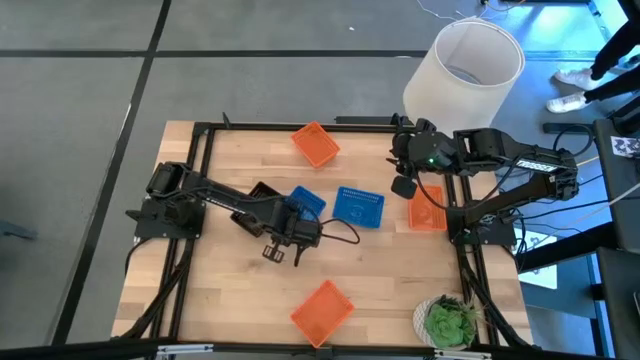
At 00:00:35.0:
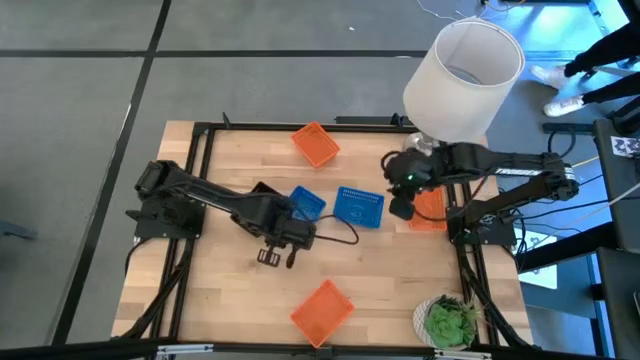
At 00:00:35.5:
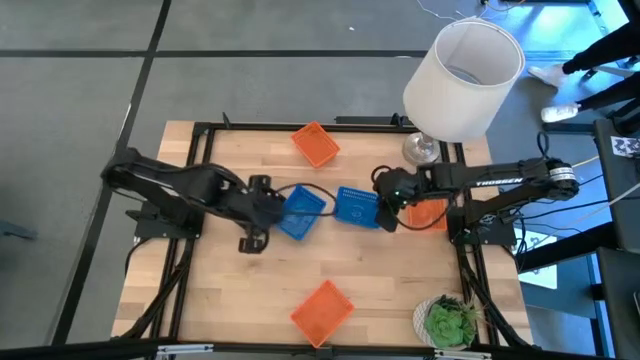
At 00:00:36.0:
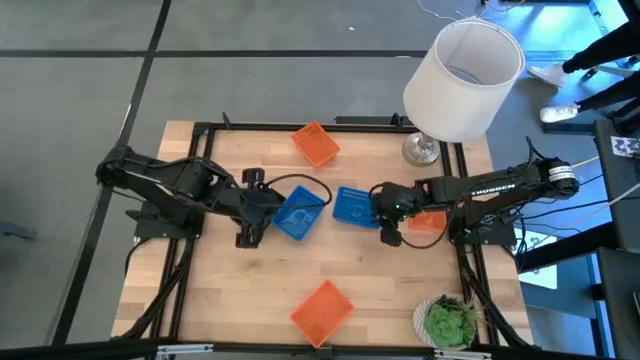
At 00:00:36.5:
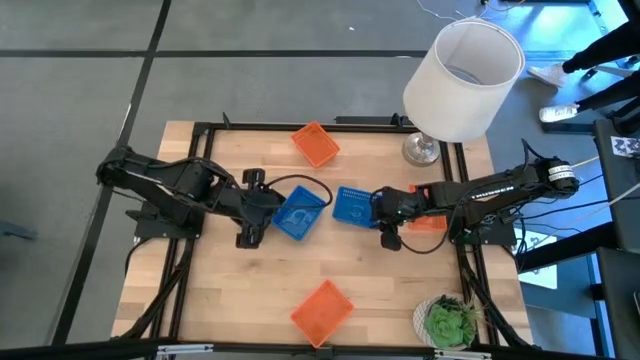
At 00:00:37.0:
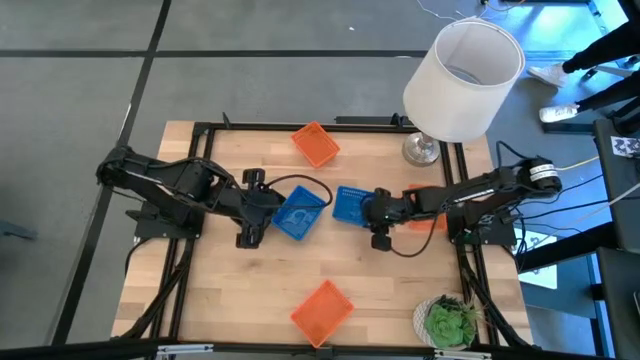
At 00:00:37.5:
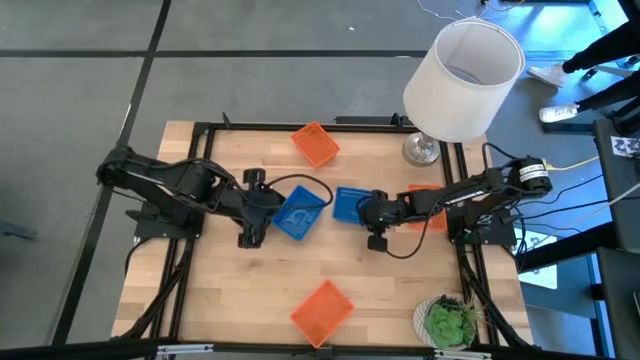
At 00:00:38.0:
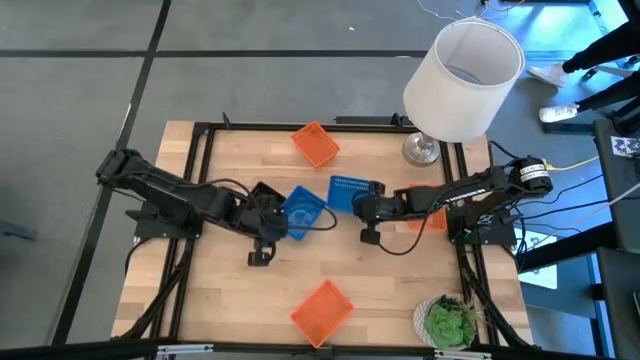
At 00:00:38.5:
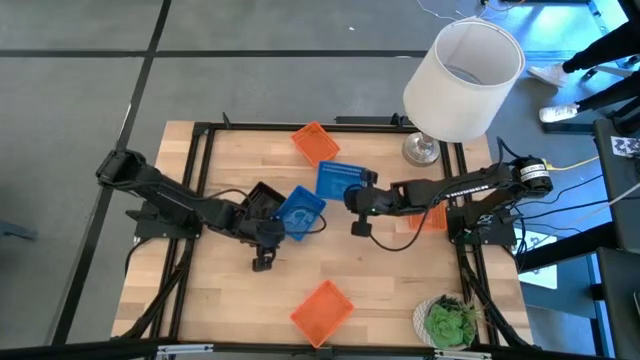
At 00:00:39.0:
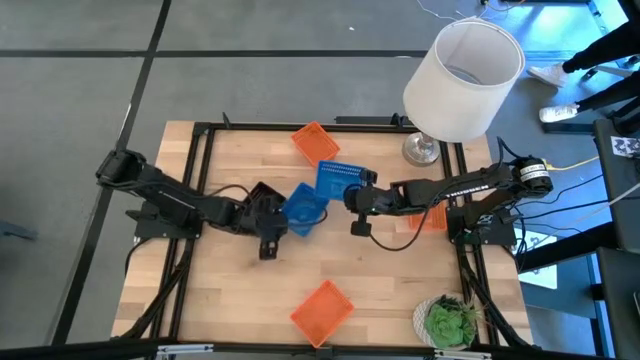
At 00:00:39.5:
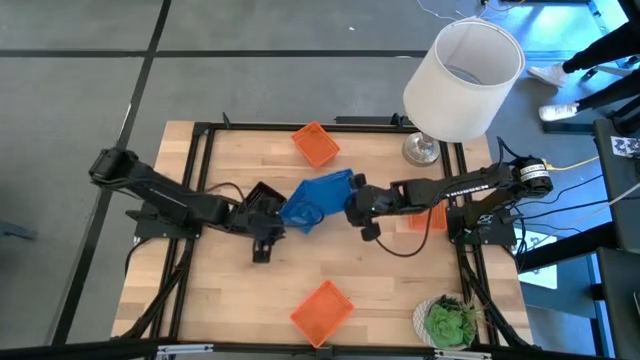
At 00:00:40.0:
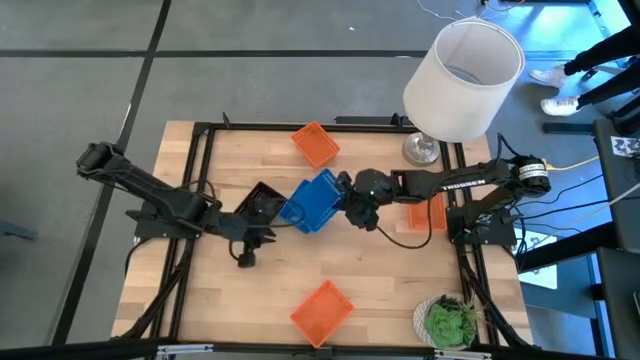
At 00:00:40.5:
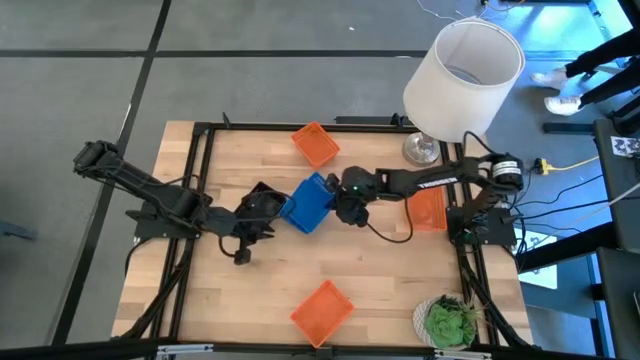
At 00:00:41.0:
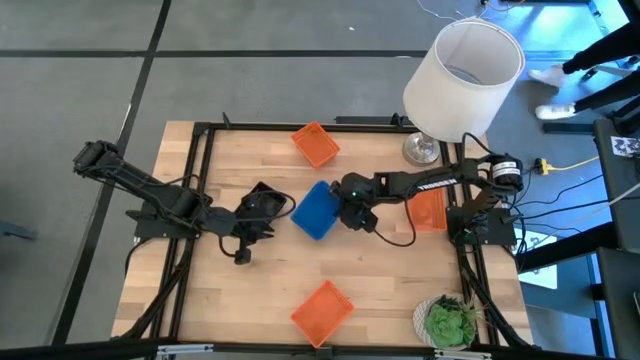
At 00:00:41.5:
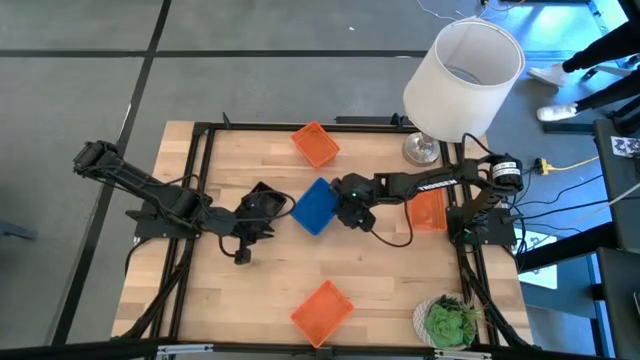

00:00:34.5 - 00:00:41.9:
Stack the right blue bin on the left blue bin
